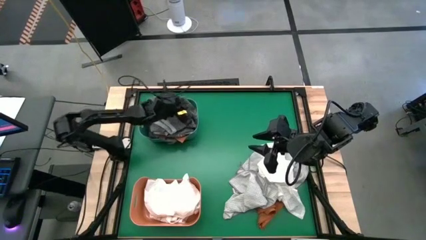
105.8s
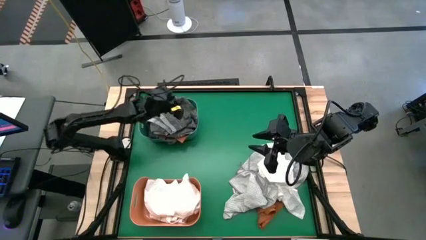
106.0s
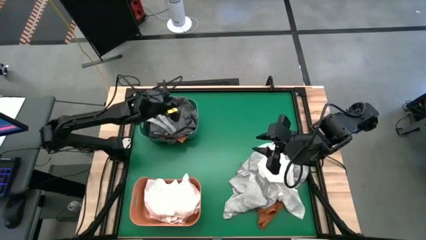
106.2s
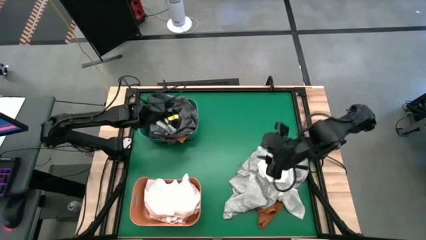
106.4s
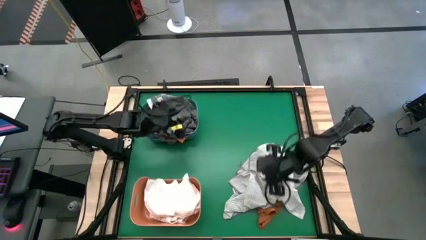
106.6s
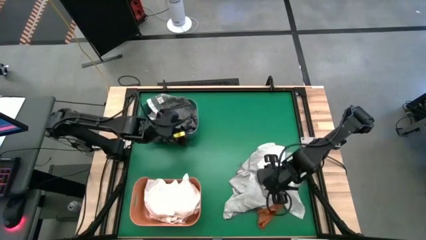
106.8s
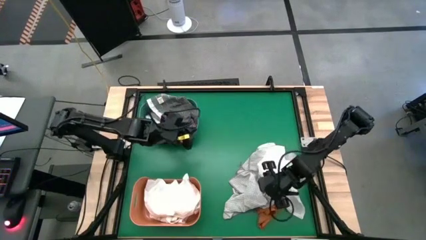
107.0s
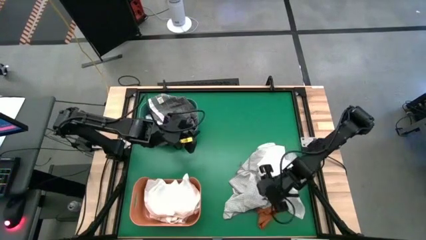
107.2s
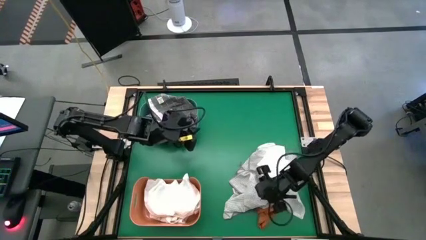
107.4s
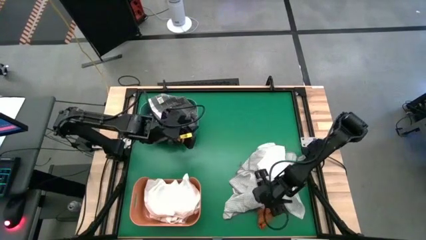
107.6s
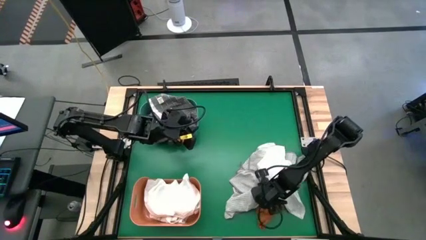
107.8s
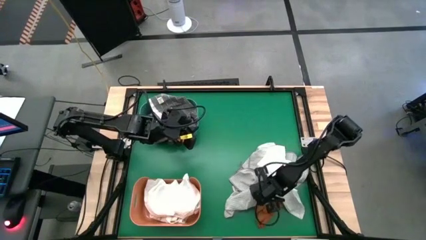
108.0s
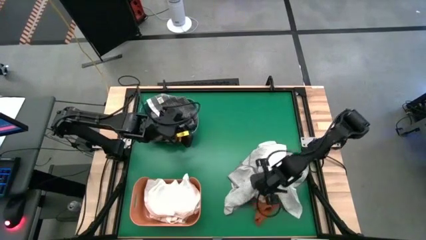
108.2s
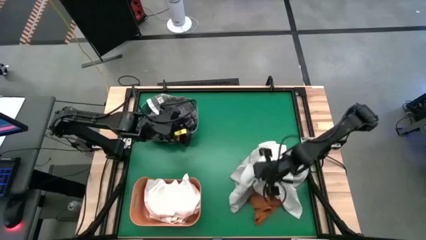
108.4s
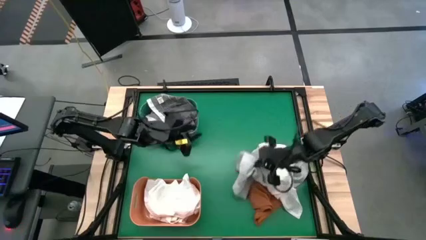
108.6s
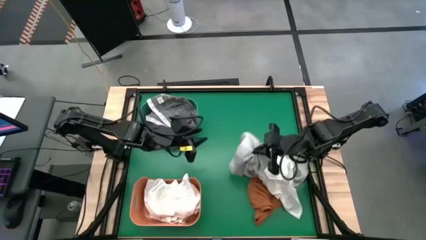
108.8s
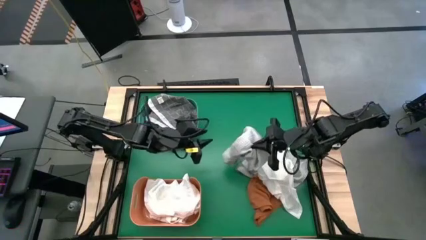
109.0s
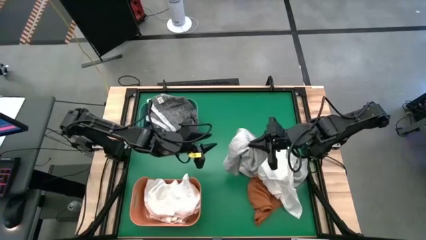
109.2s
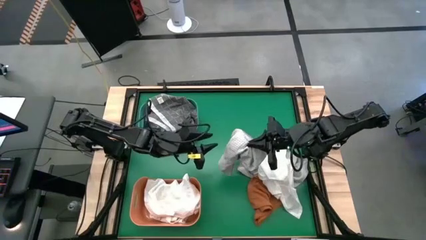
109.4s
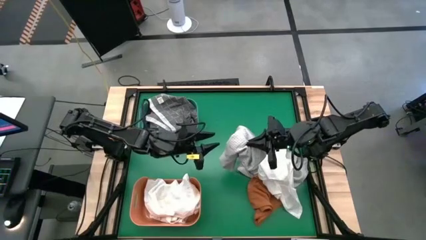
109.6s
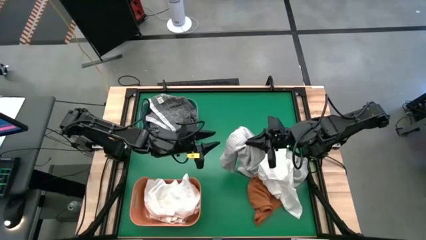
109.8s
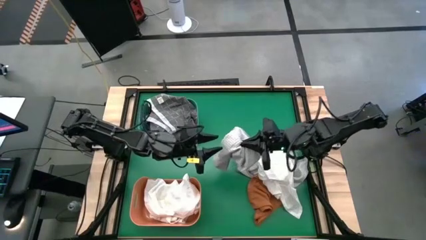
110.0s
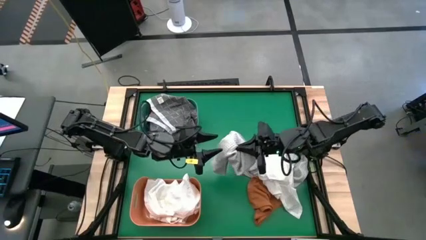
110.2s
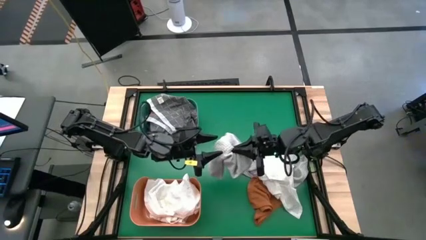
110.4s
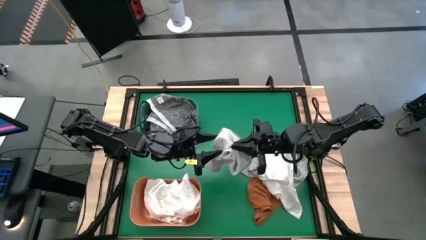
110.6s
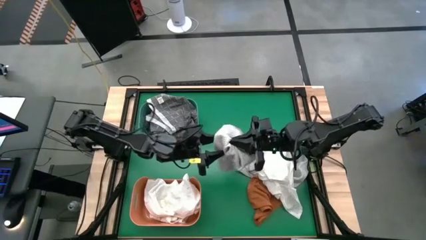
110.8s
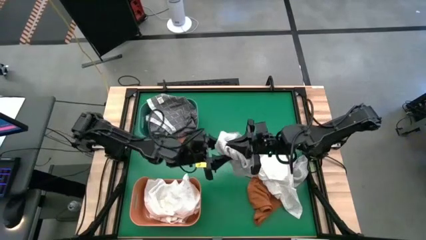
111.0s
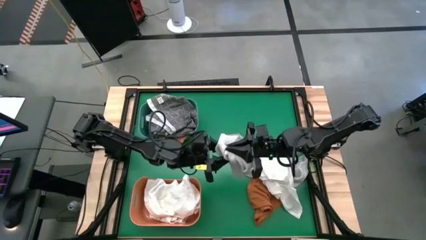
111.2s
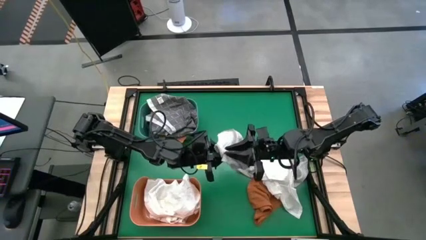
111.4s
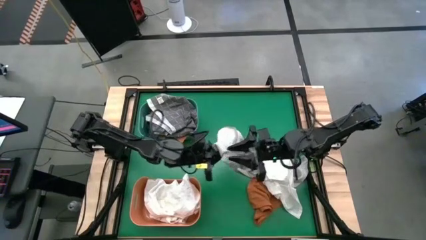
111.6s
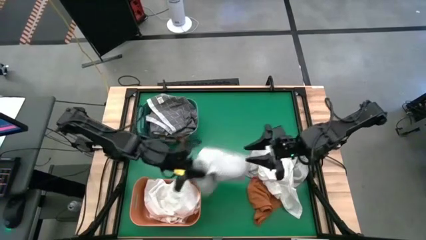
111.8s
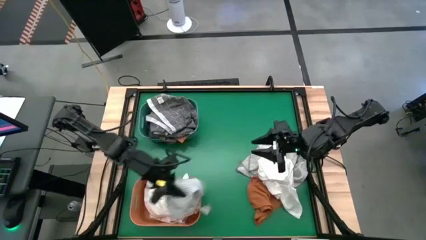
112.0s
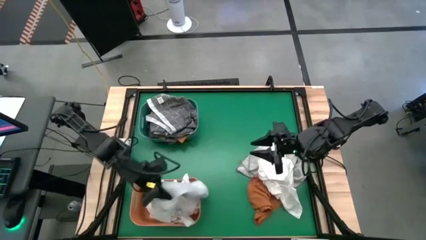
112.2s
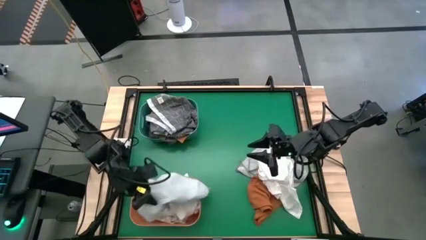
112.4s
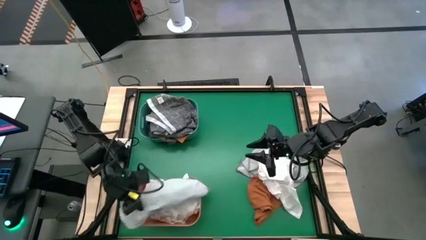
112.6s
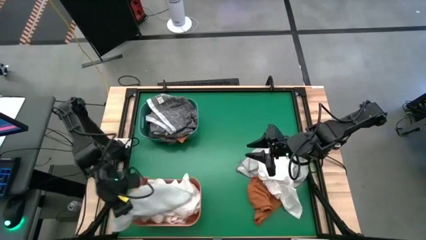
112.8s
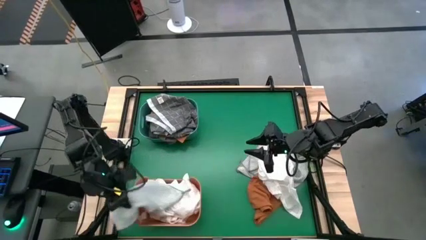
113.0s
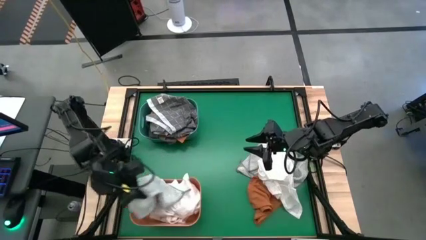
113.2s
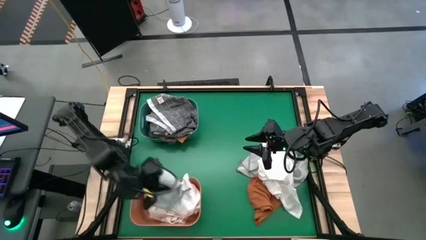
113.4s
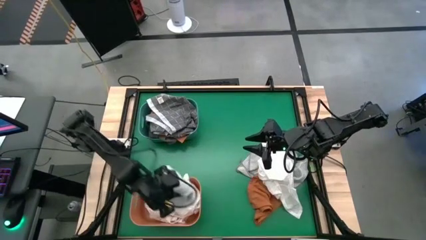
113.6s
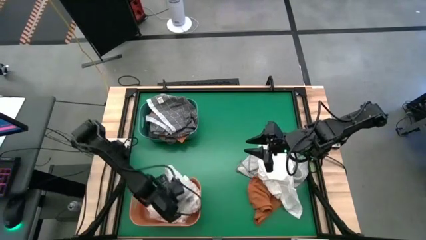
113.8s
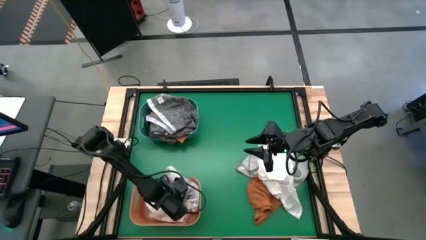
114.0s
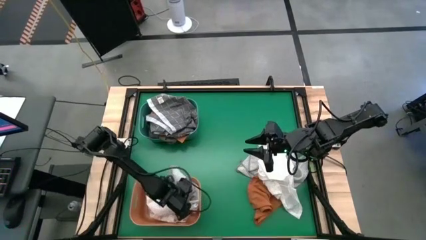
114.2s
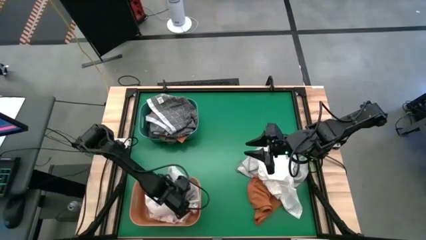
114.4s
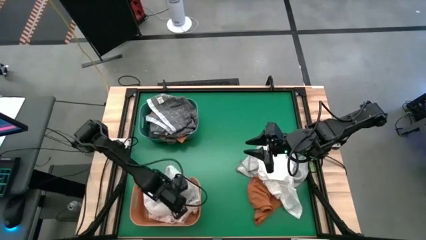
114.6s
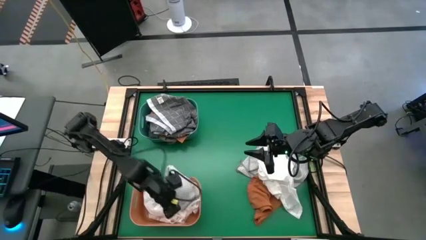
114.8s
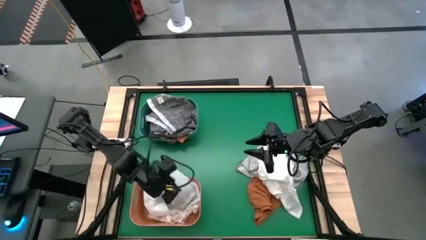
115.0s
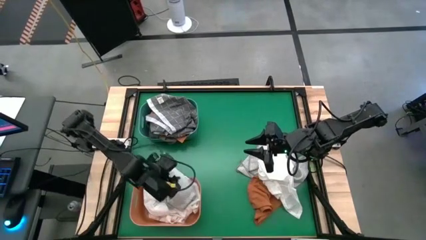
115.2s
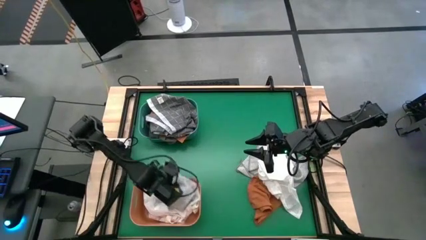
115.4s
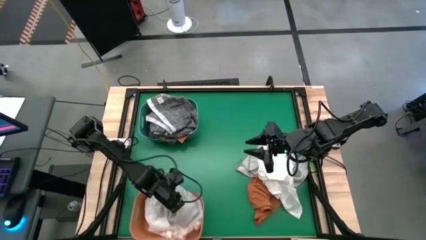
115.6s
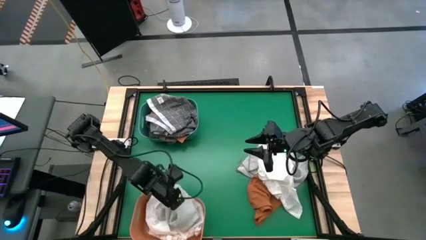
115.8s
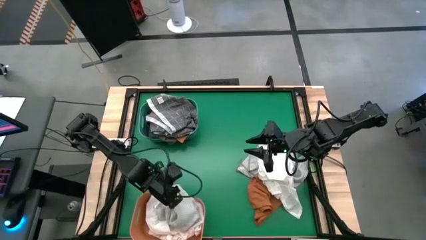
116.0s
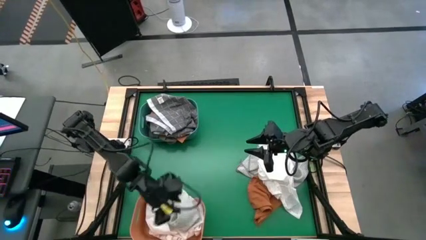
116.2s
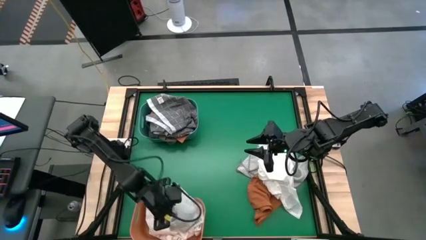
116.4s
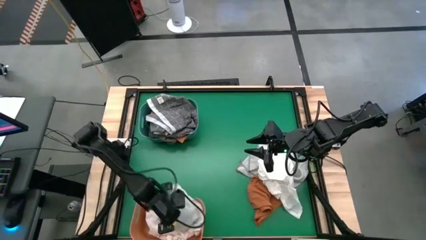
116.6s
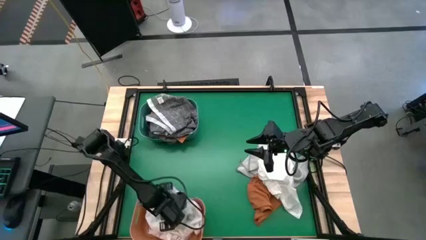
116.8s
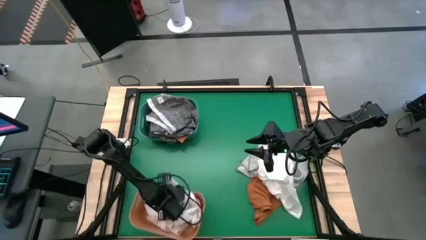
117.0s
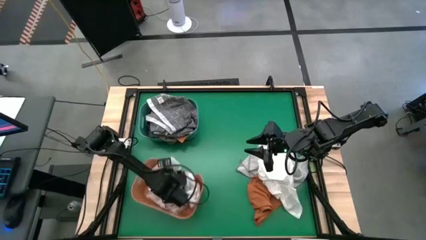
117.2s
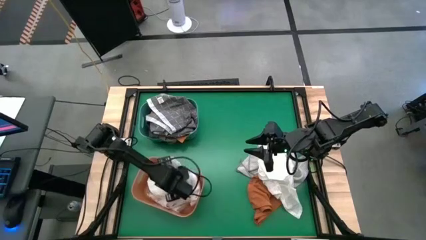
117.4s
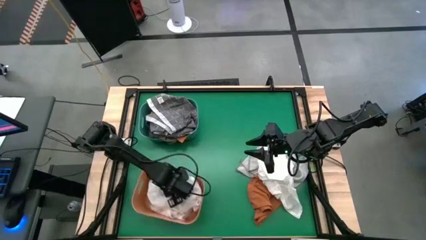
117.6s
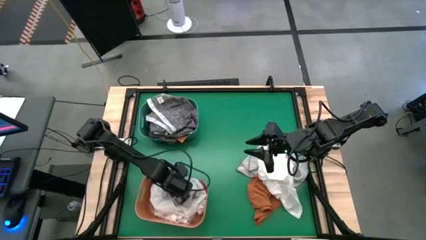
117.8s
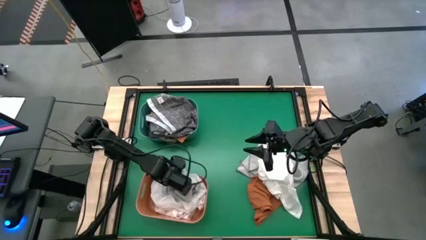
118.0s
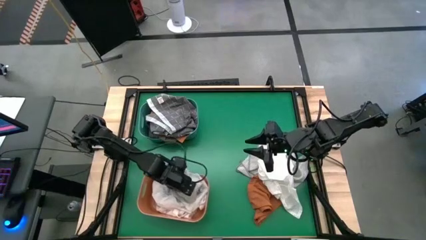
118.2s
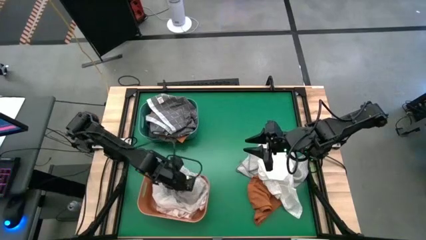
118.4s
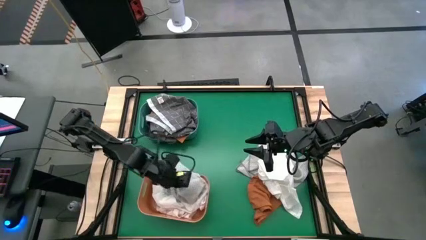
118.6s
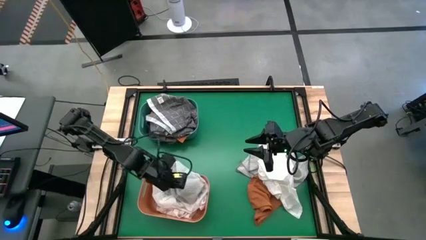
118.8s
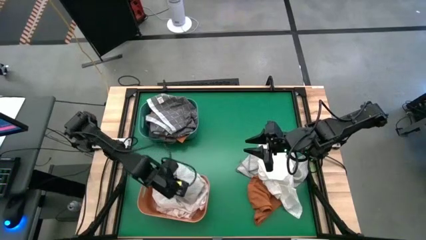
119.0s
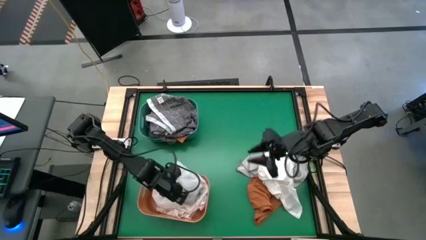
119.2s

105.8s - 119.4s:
Task: Sort microfiber towel by color & place in baskets
Put the gray microfiber towel into the orange bin
